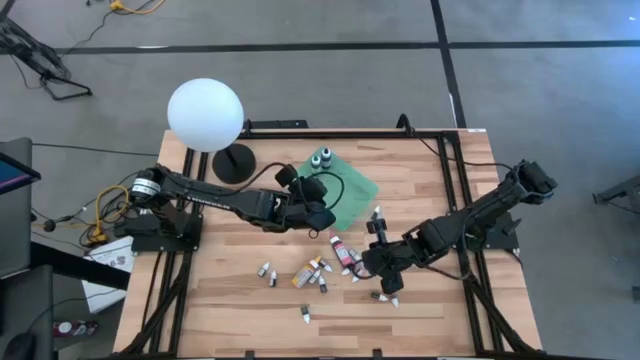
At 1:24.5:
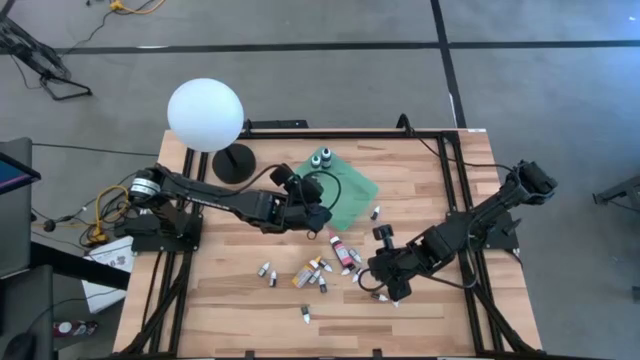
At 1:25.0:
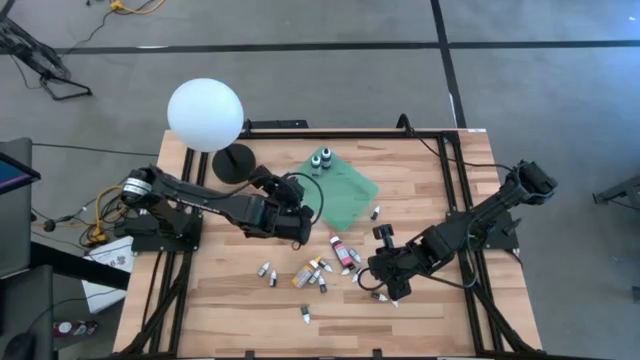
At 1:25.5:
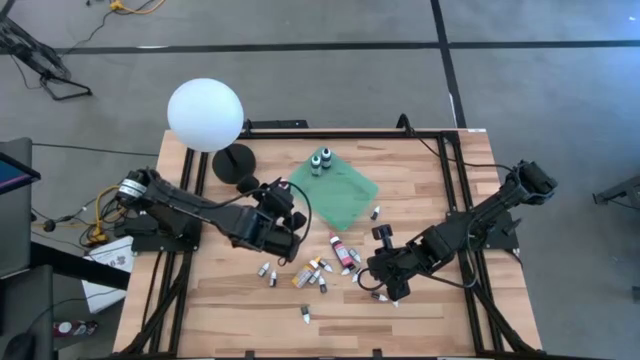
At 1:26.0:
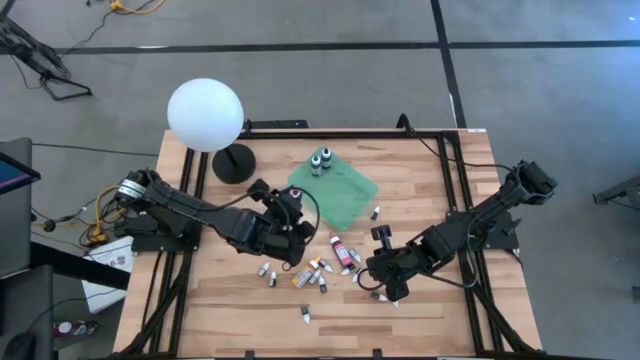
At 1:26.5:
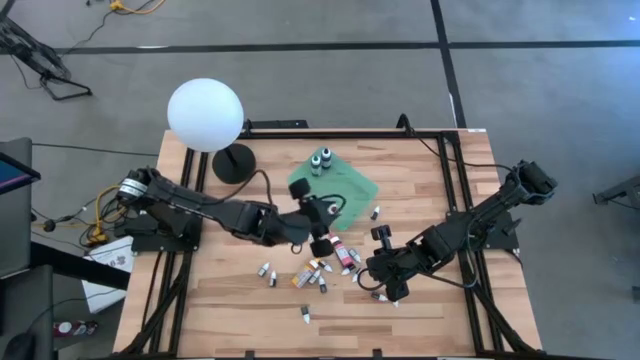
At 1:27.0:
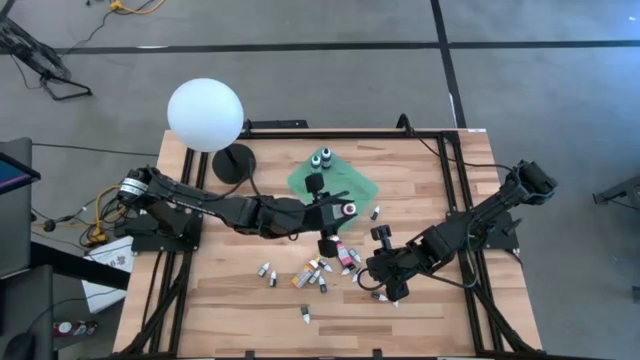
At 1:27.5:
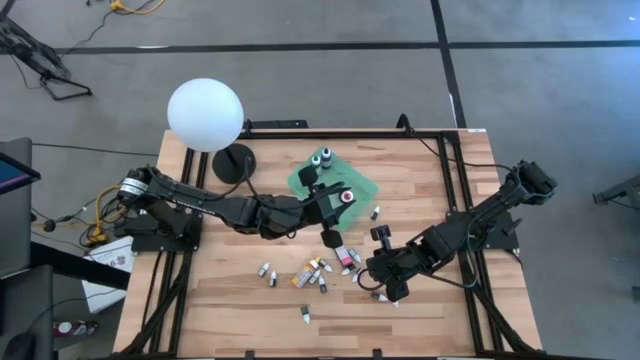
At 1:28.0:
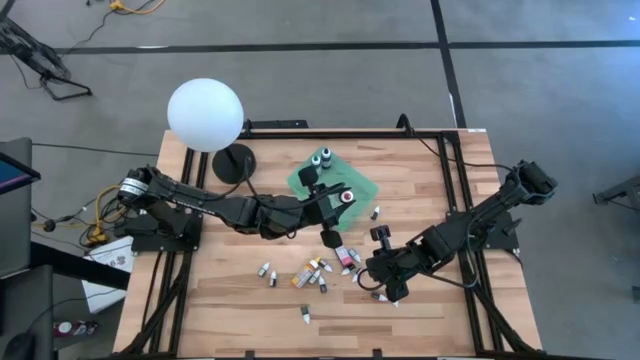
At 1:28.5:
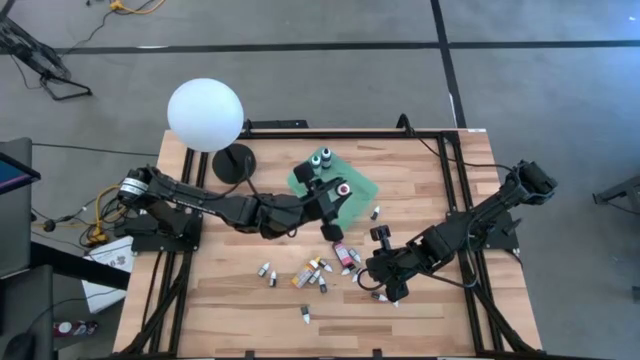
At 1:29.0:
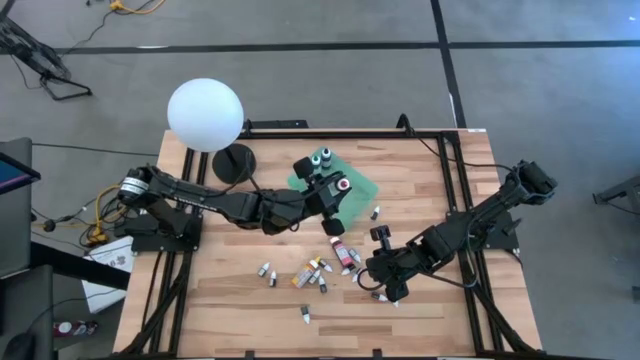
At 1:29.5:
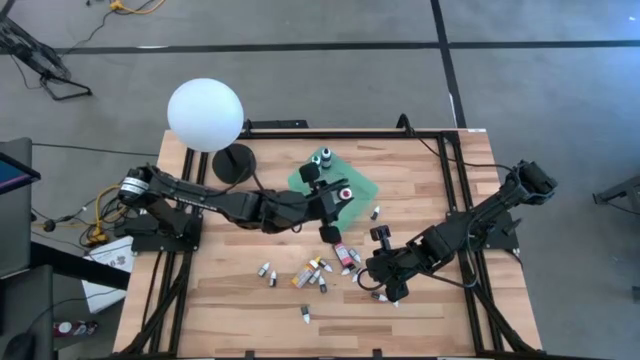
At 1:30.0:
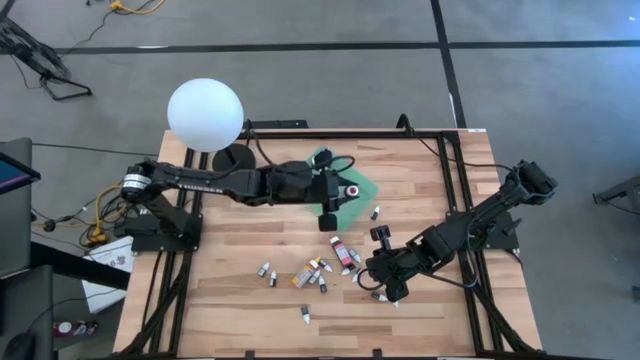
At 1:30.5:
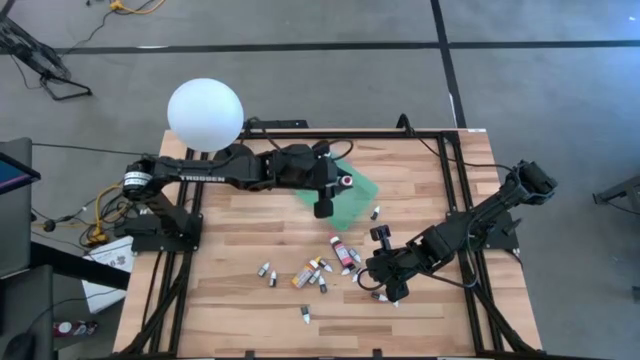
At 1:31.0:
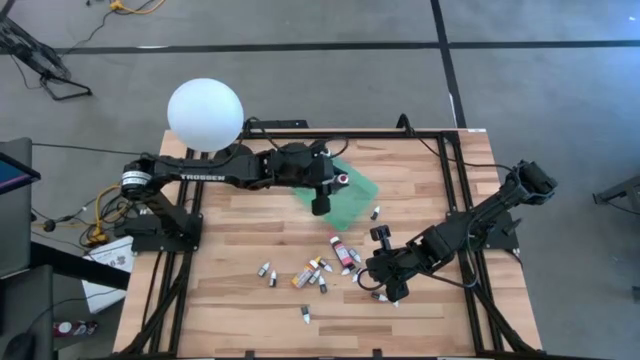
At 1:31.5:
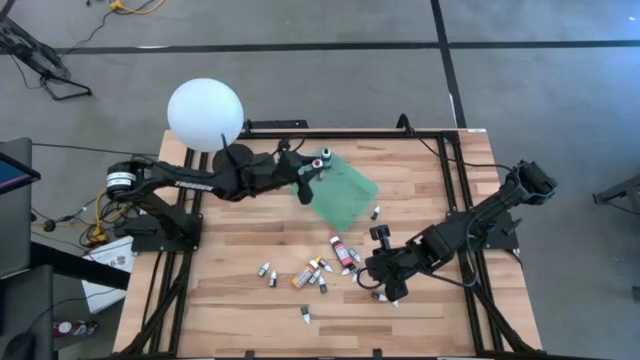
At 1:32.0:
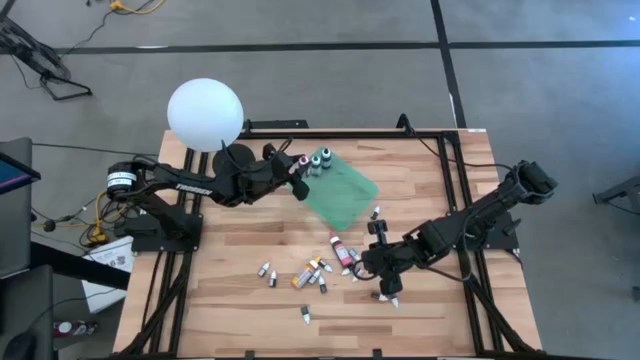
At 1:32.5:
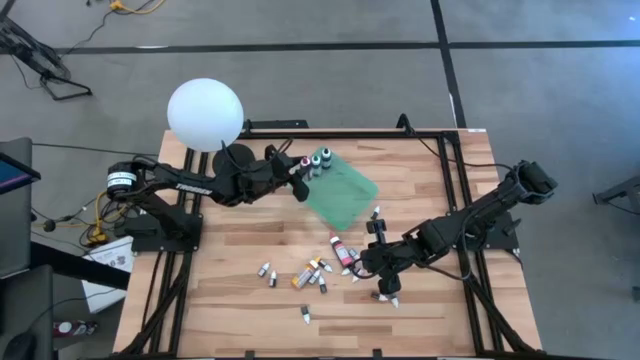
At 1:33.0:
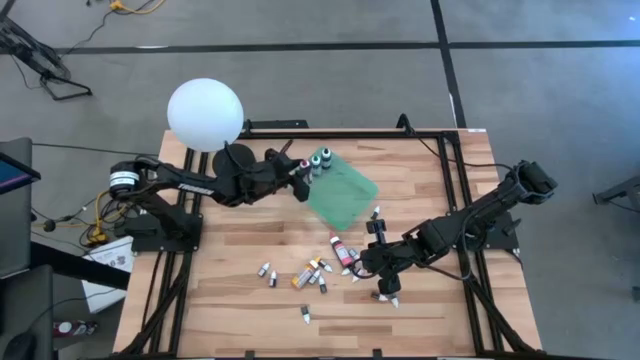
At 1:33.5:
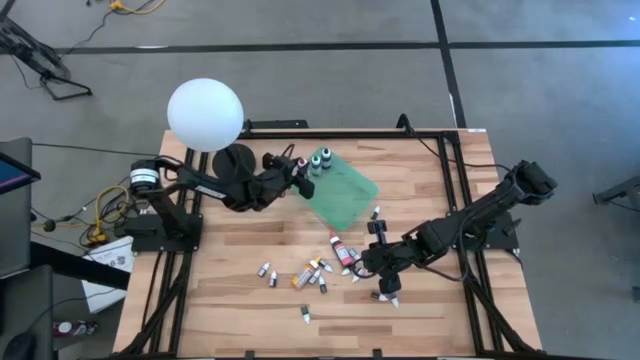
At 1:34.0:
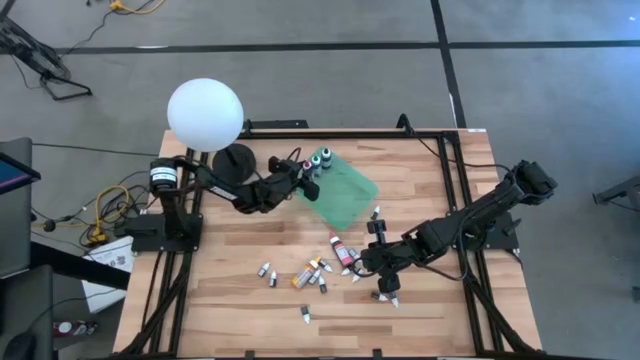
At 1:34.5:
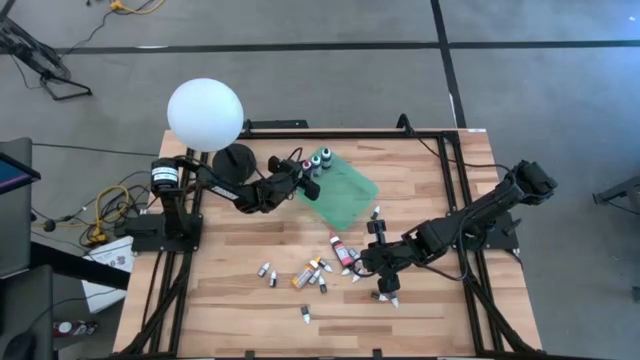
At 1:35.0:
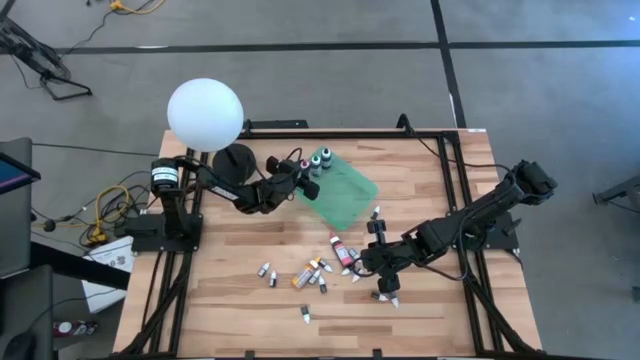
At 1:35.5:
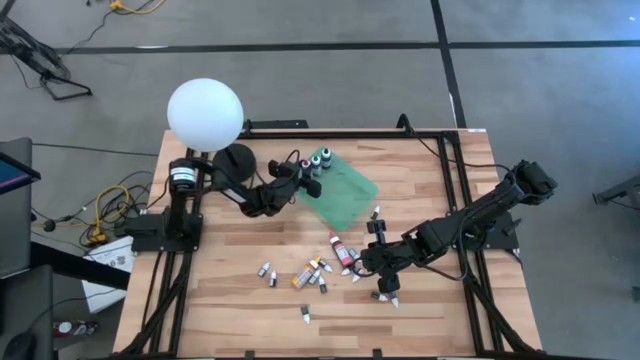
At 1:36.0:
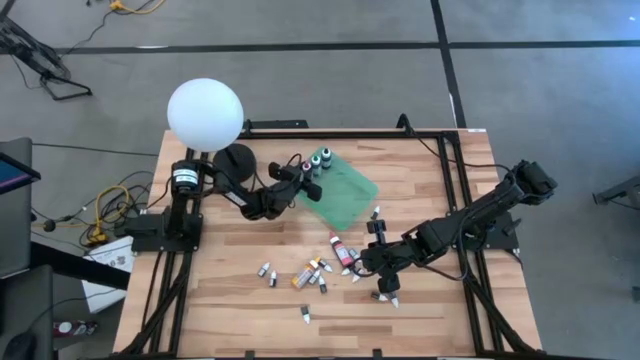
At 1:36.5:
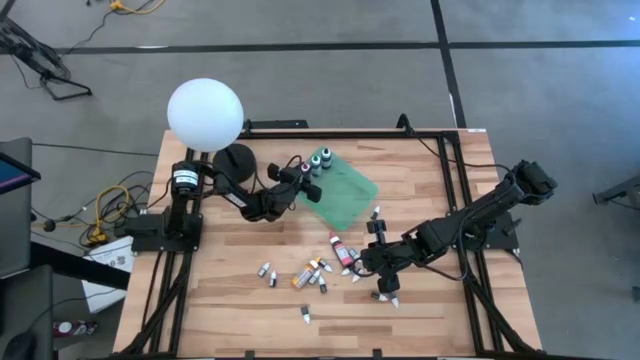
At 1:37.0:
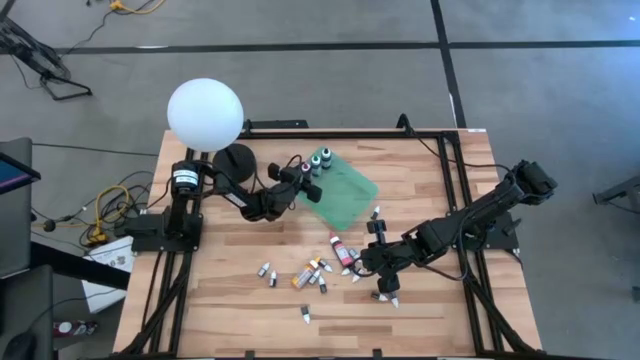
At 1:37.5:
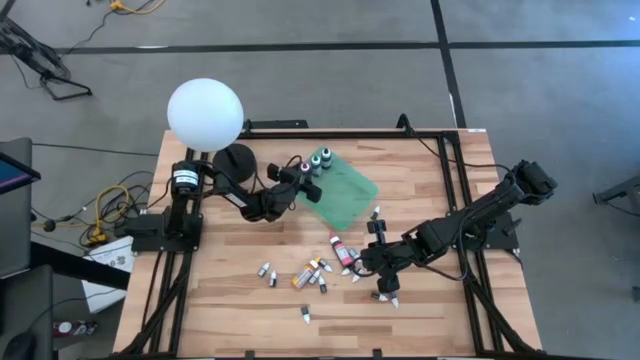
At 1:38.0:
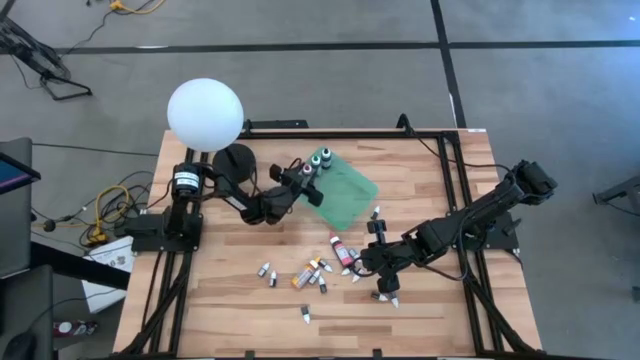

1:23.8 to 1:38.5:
Task: Pick & Place food coloring
Put the large red food coloring bottle into the green bin

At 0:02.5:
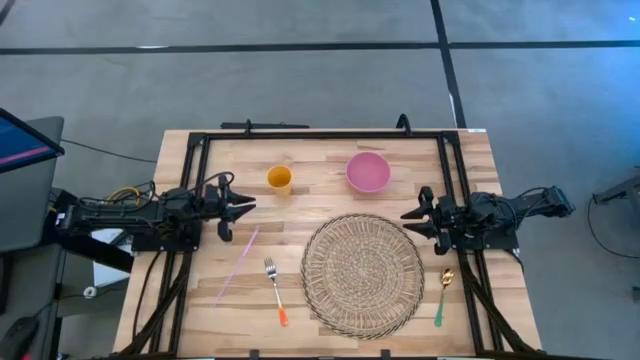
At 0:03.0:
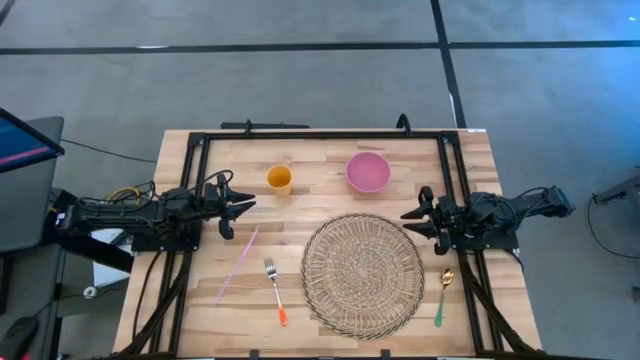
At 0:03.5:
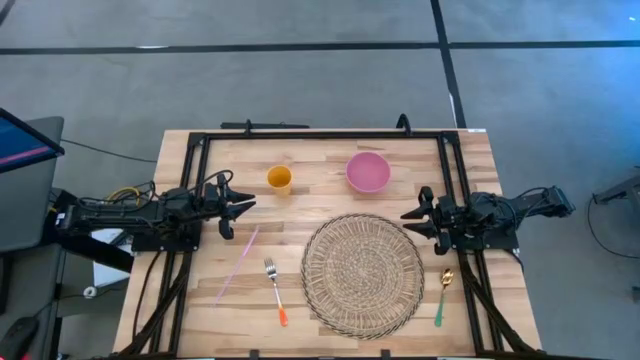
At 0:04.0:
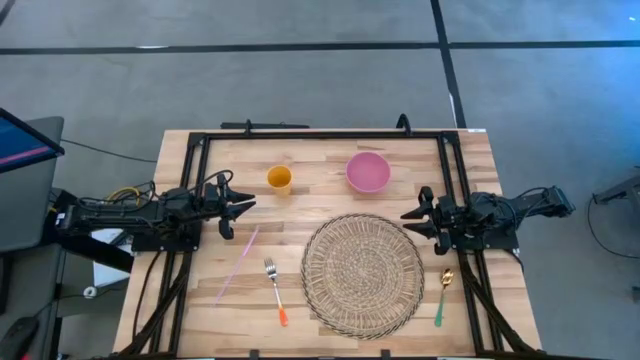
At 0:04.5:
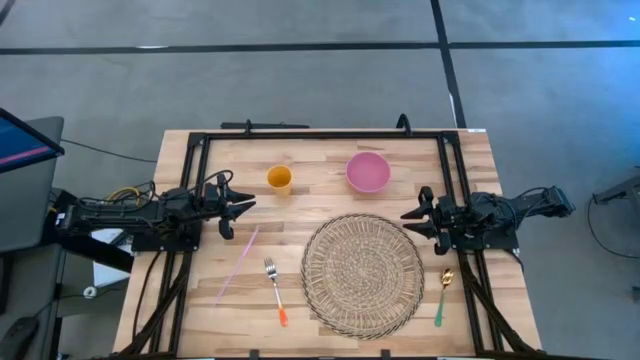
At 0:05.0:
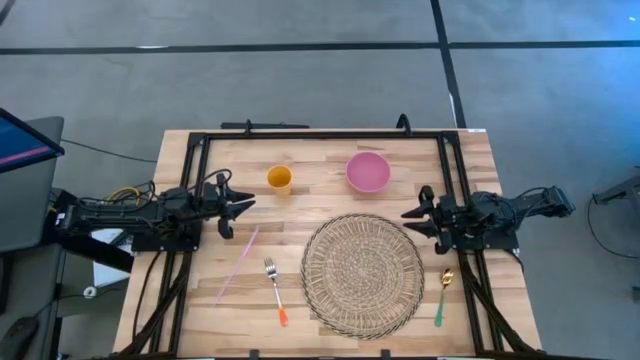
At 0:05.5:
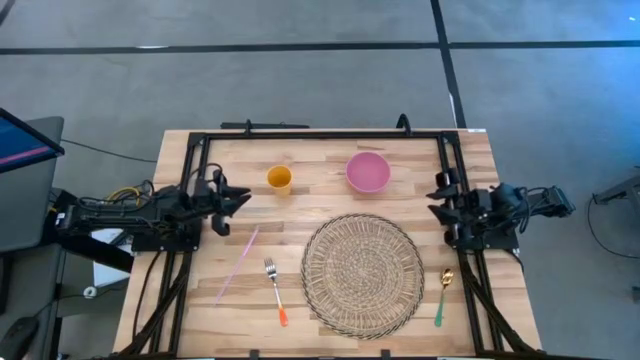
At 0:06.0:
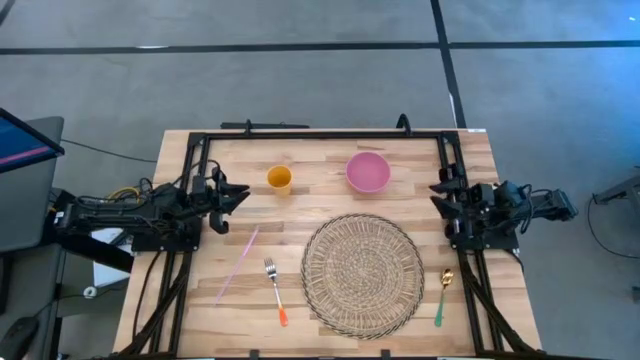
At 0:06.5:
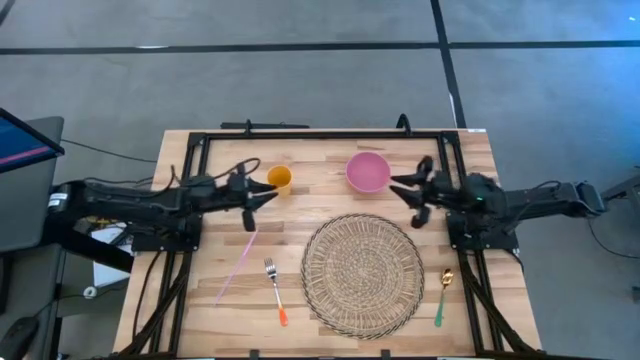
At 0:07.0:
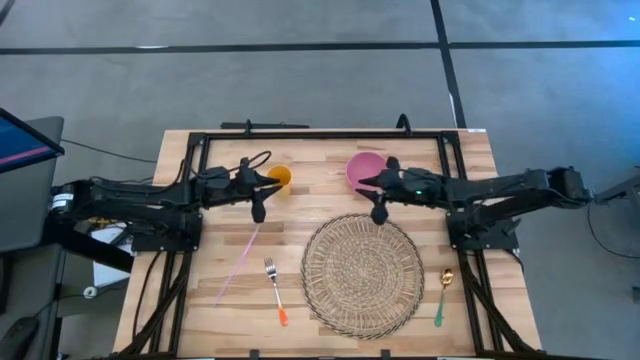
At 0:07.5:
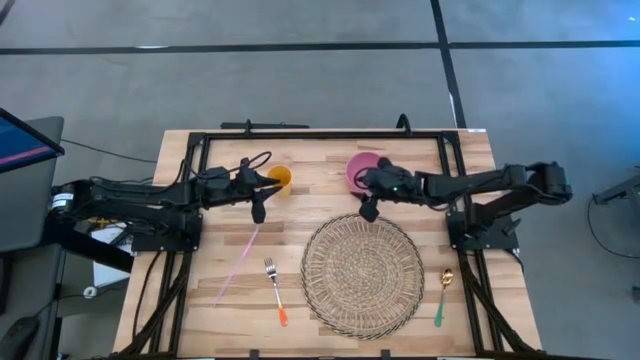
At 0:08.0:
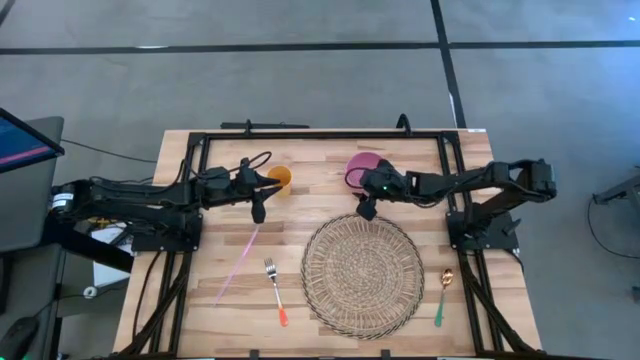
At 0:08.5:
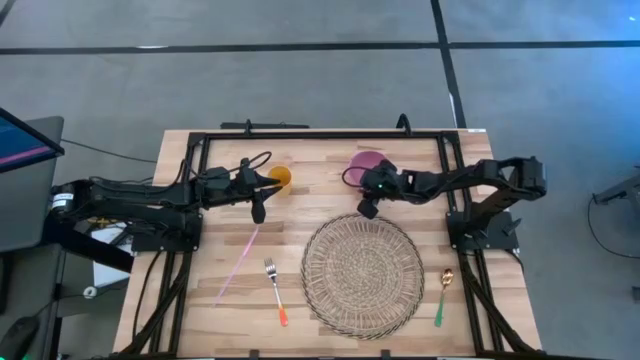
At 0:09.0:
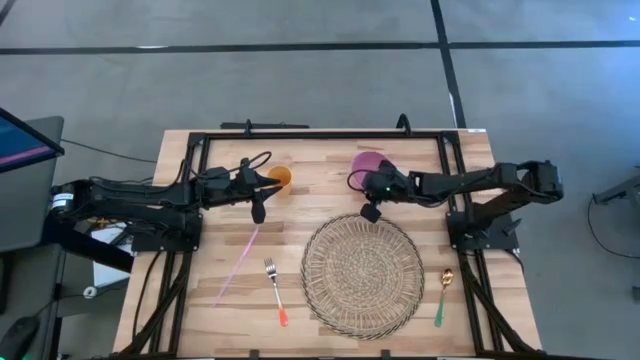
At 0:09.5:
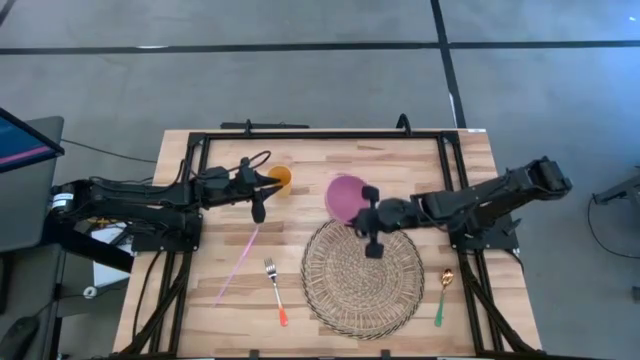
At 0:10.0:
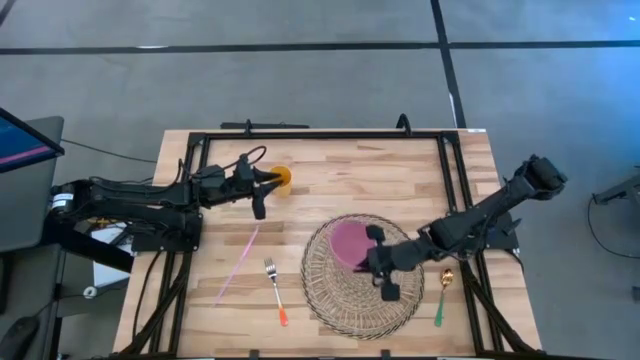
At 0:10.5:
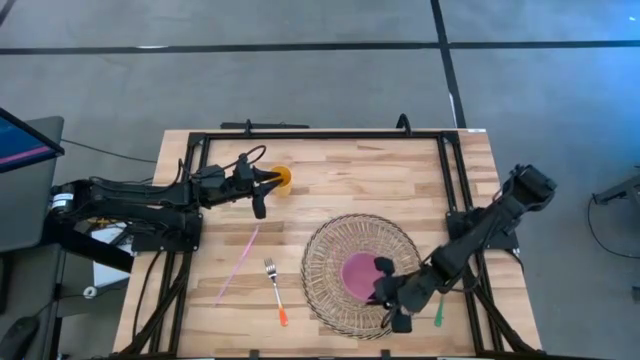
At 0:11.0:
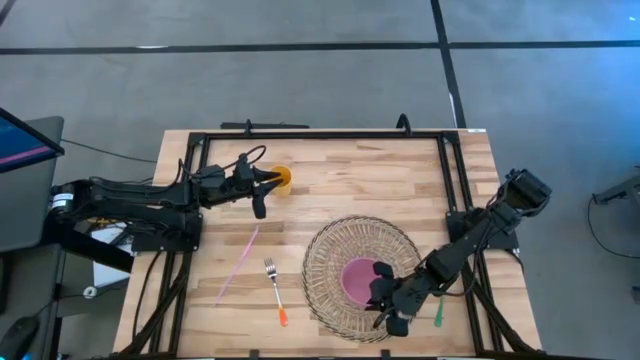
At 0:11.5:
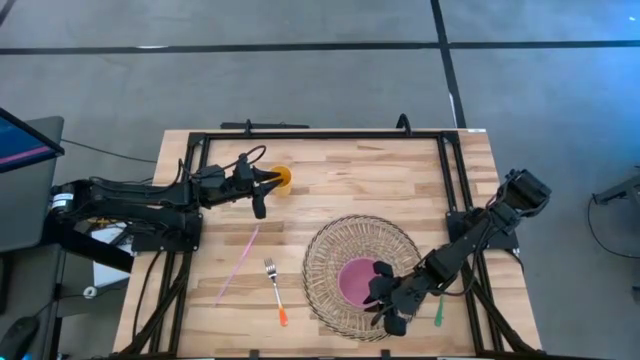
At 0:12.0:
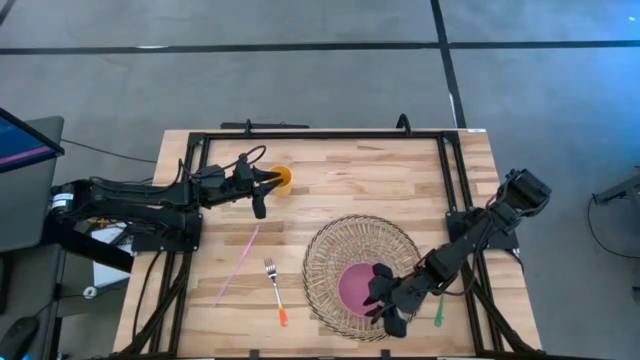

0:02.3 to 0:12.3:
Task: Pick & Place Utensil
Put the pink bowl on the brown table mat
